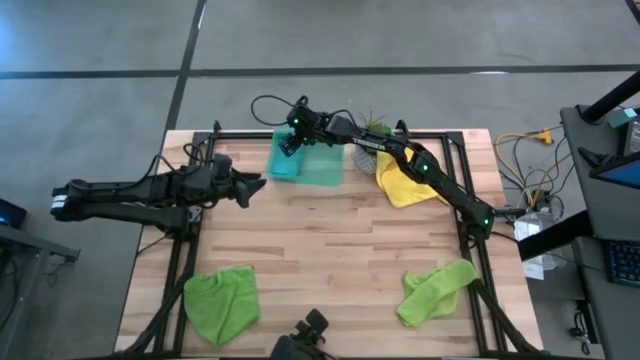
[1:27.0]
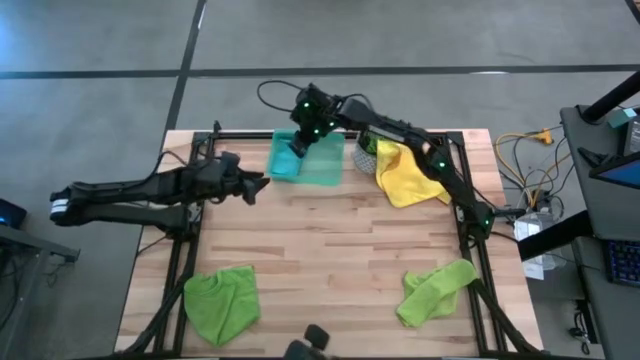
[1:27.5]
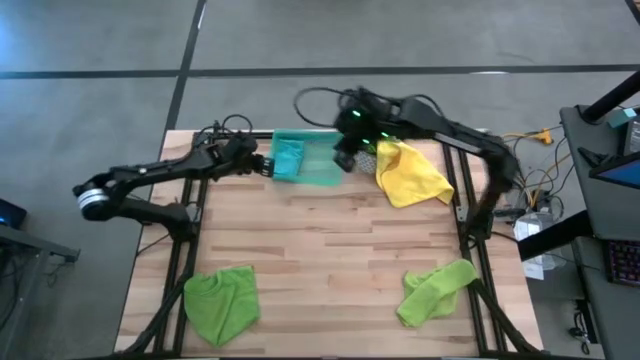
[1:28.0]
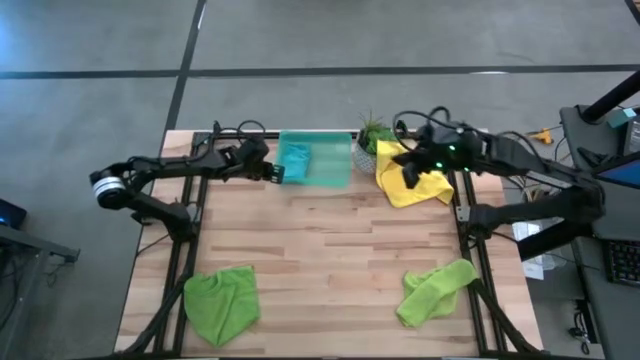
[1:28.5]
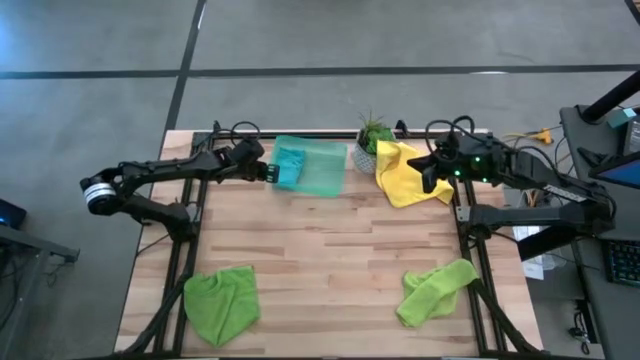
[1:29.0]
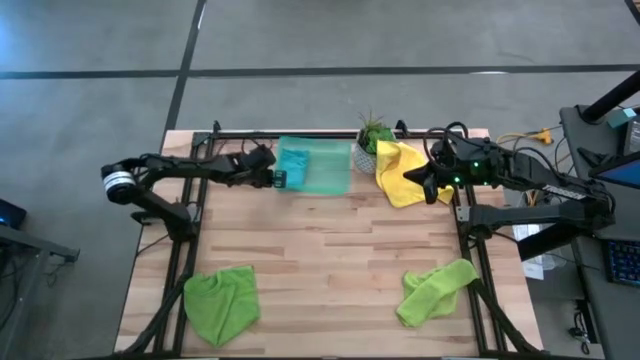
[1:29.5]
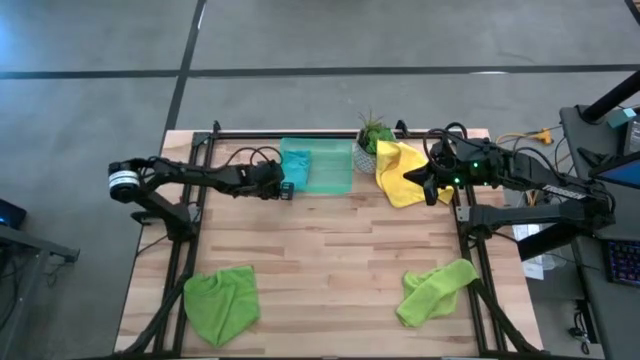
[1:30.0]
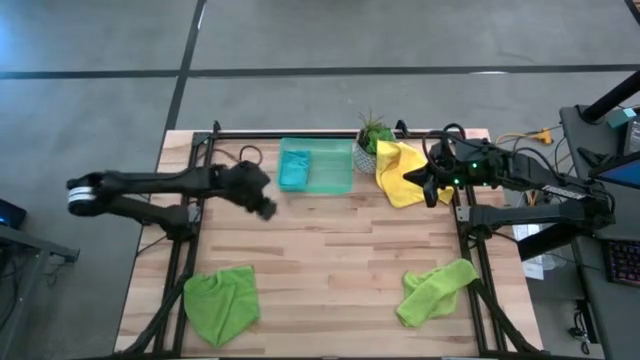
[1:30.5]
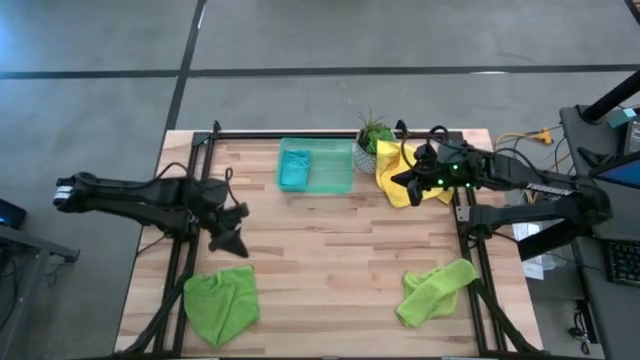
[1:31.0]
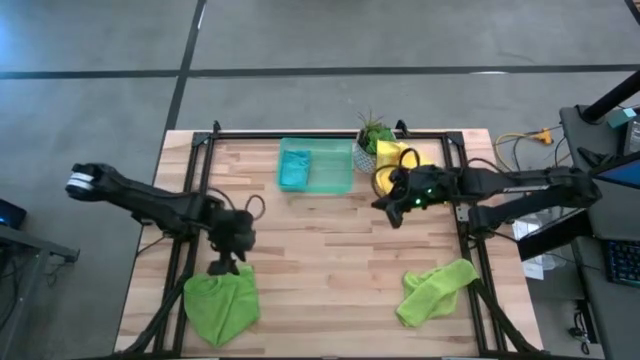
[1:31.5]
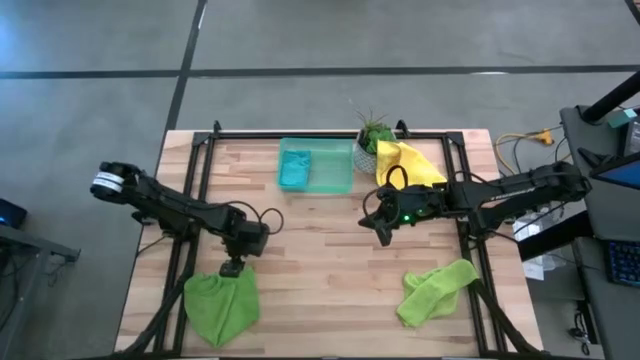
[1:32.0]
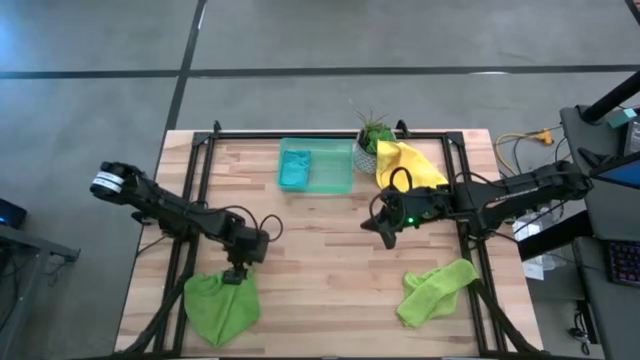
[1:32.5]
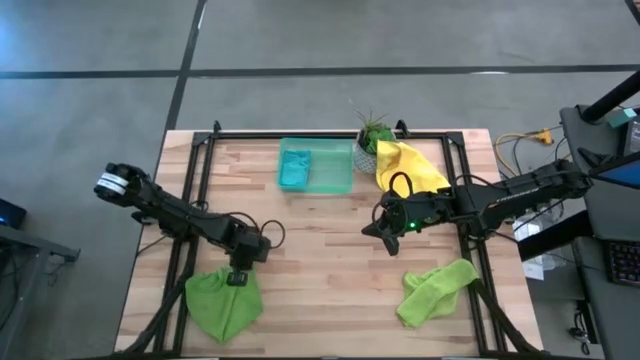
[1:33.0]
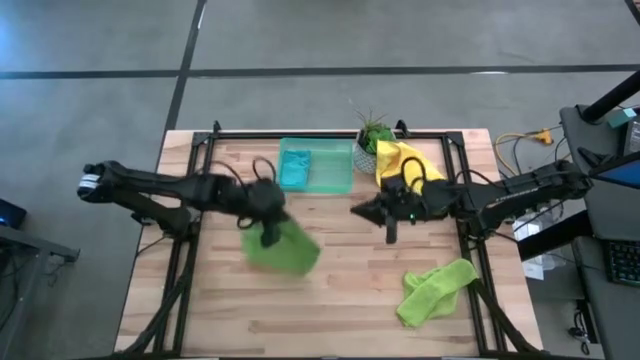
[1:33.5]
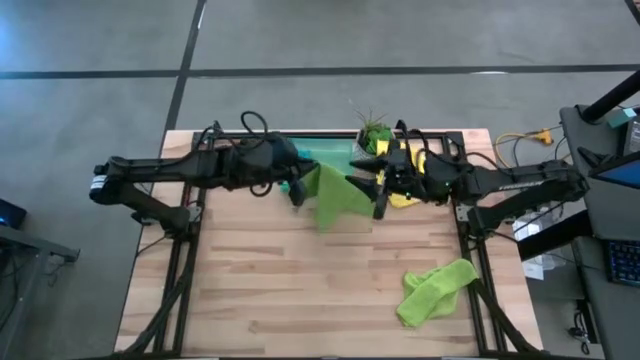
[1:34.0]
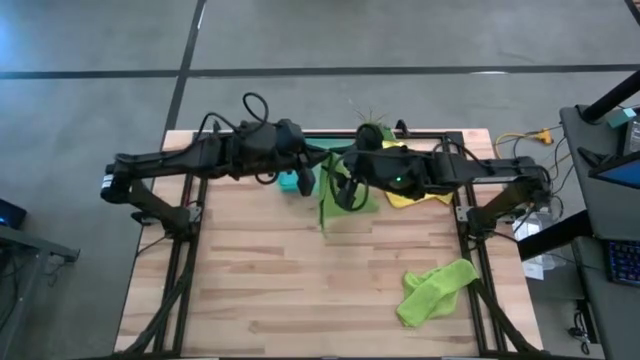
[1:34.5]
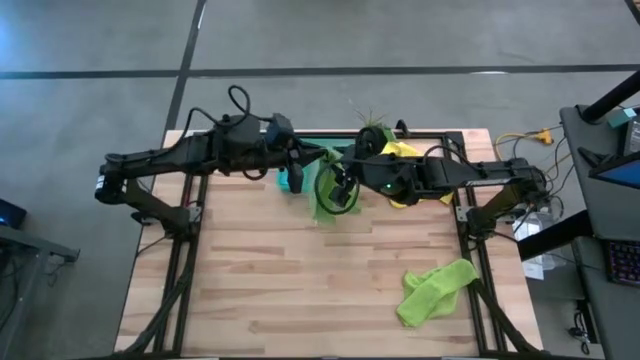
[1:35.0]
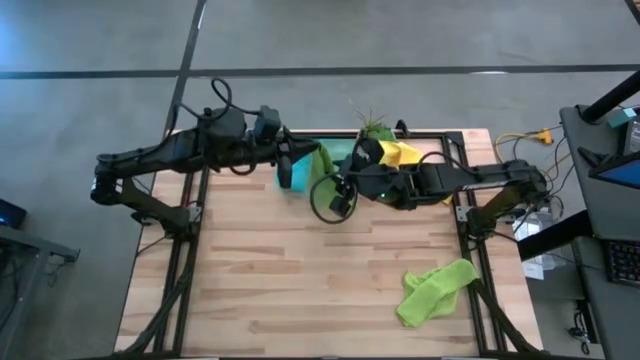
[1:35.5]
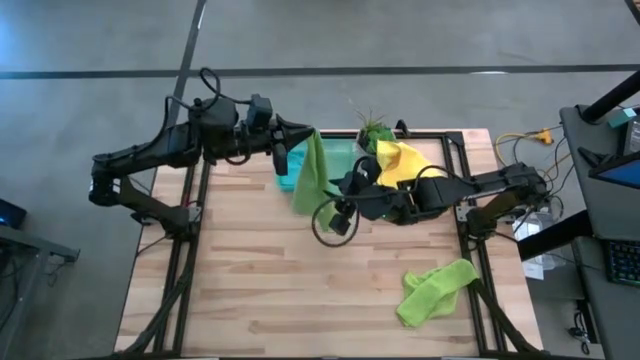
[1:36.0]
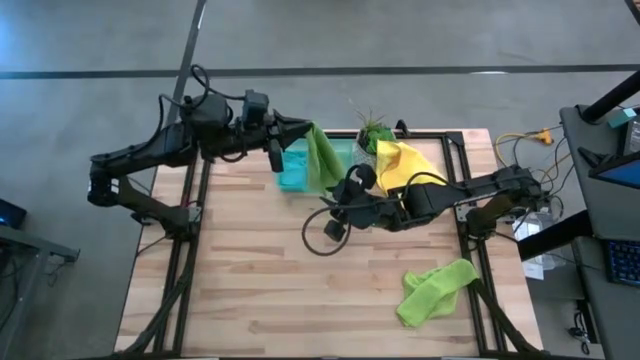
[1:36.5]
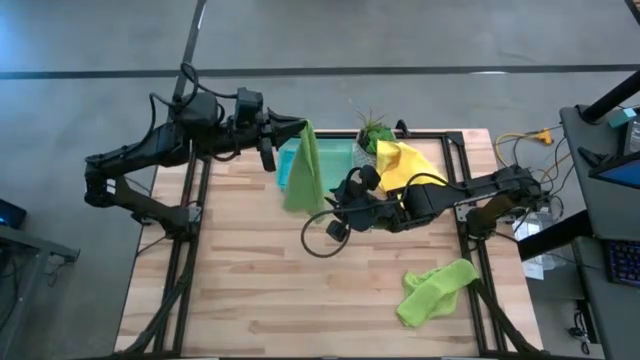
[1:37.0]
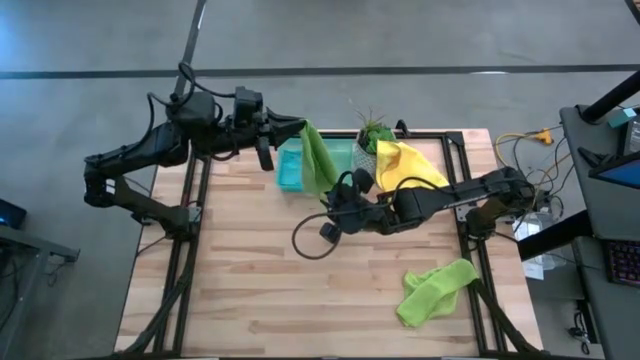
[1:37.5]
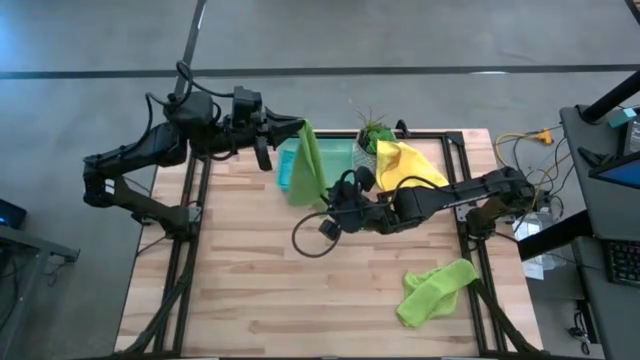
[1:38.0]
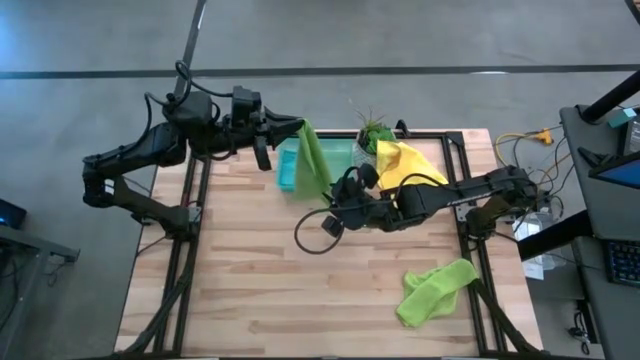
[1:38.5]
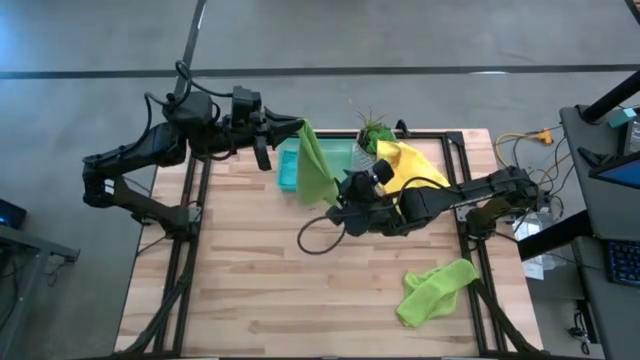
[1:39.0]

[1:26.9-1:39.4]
Task: Fold microfiber towels
Fold the green microfiber towel

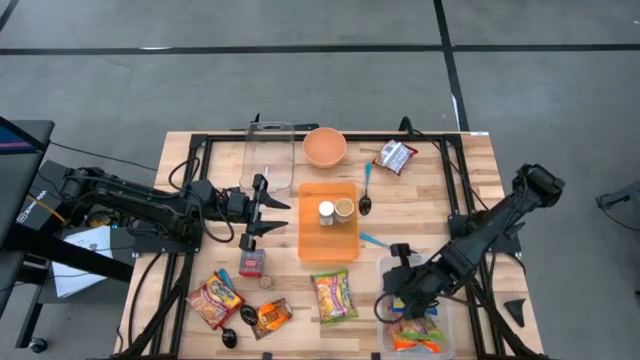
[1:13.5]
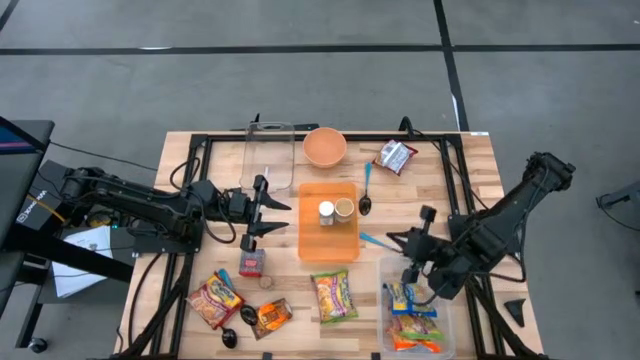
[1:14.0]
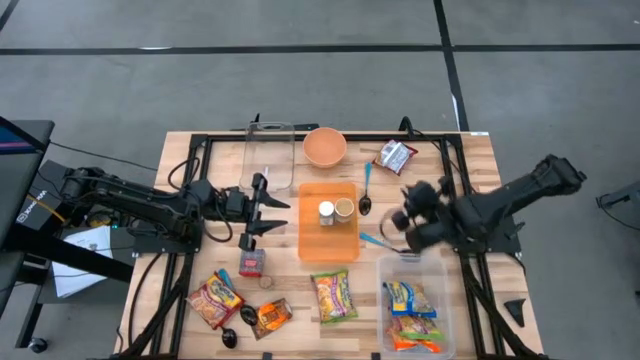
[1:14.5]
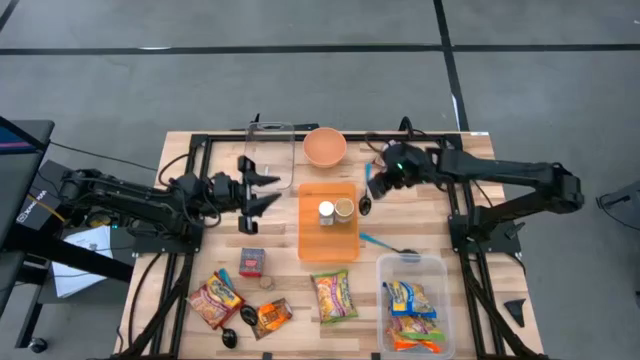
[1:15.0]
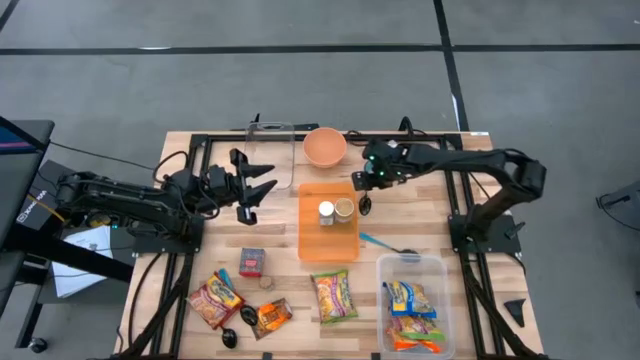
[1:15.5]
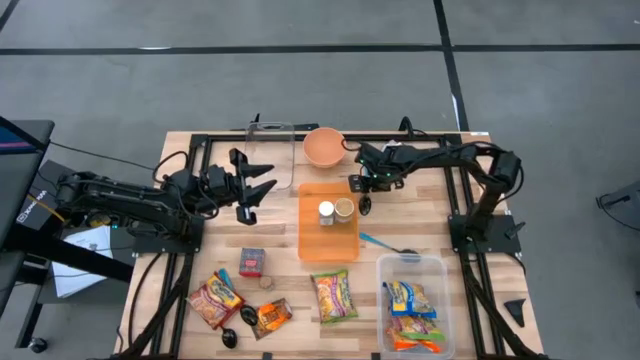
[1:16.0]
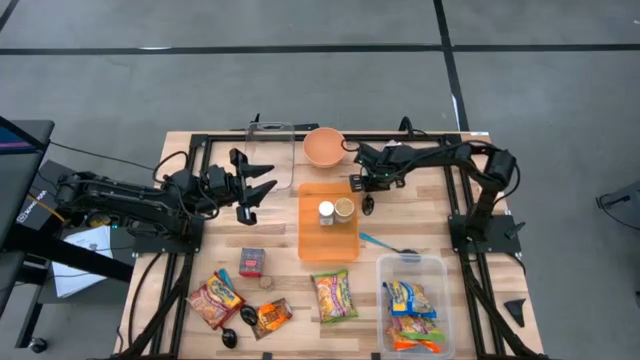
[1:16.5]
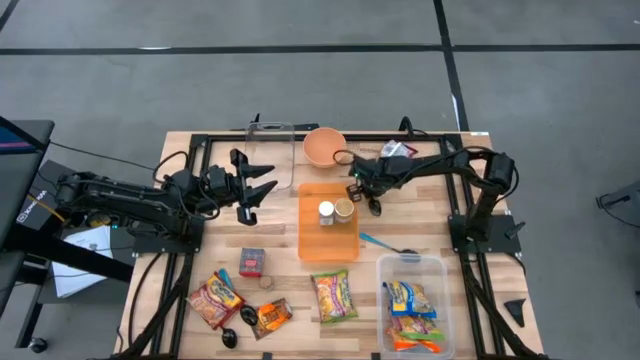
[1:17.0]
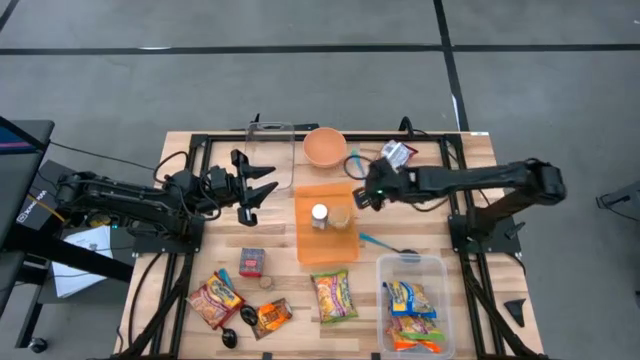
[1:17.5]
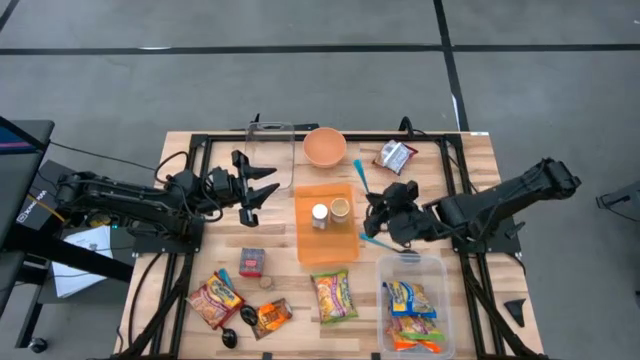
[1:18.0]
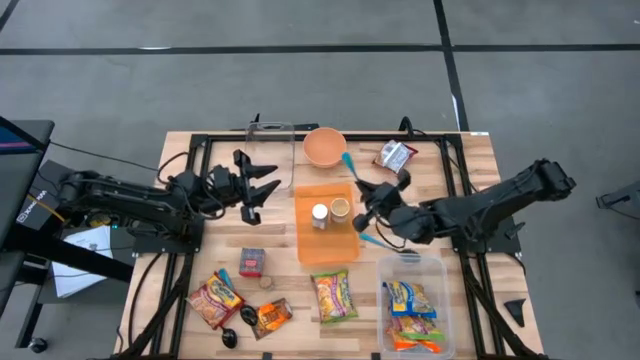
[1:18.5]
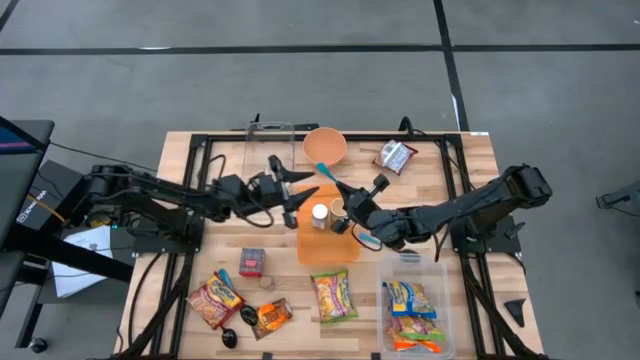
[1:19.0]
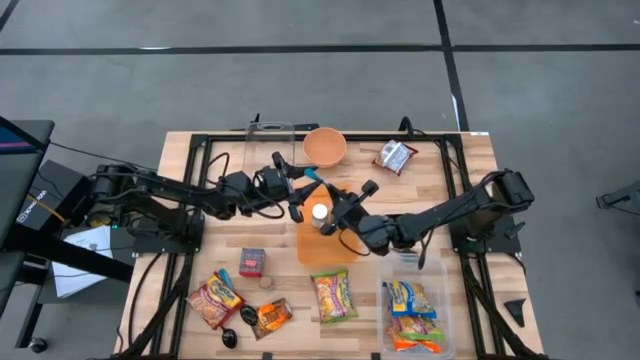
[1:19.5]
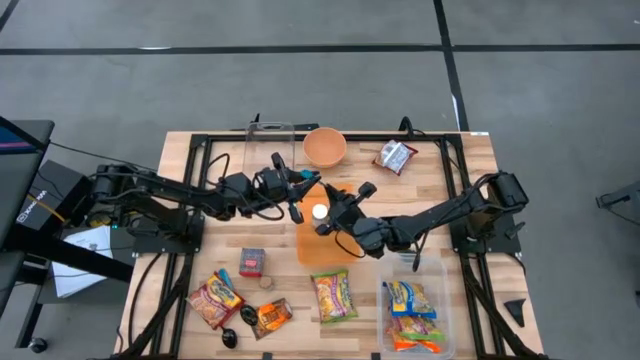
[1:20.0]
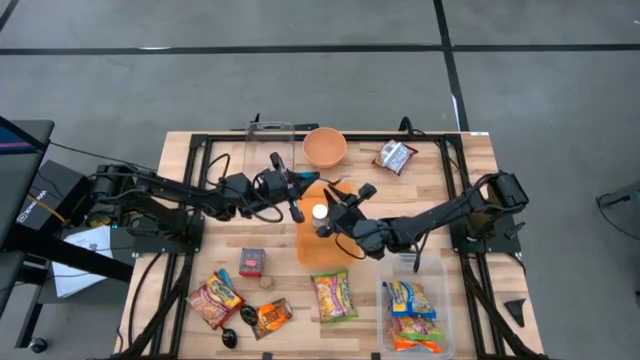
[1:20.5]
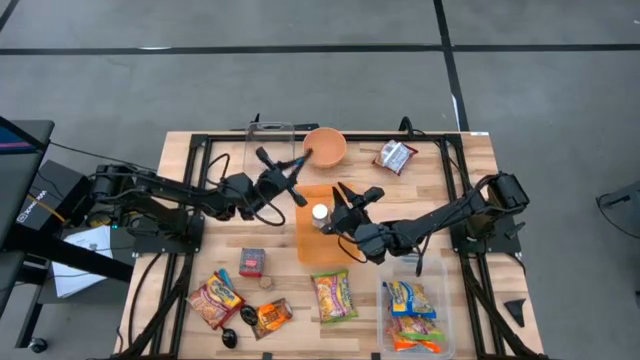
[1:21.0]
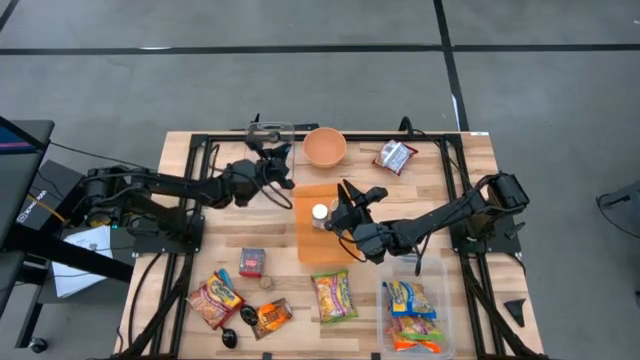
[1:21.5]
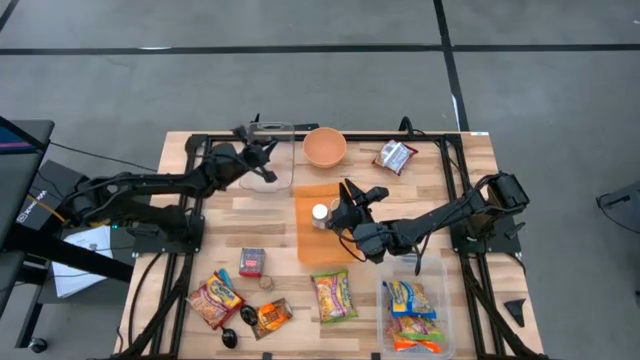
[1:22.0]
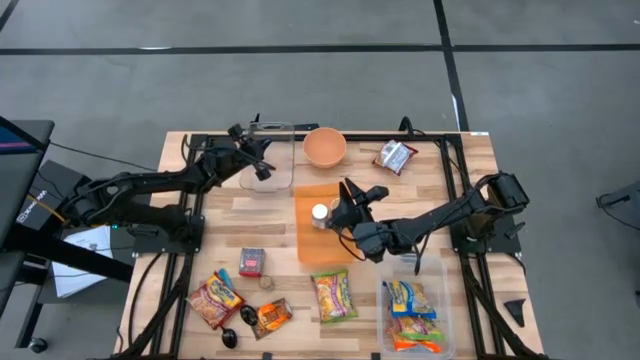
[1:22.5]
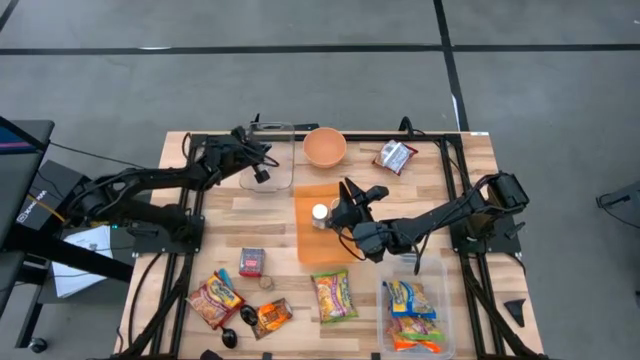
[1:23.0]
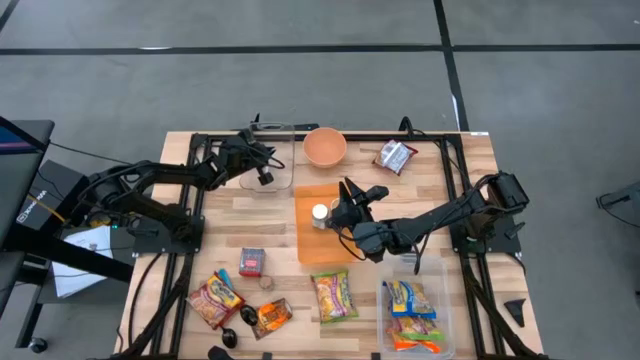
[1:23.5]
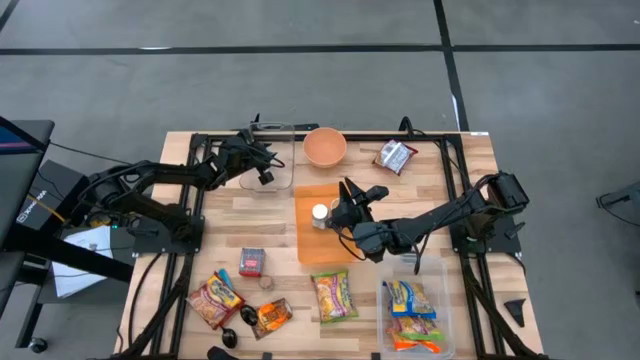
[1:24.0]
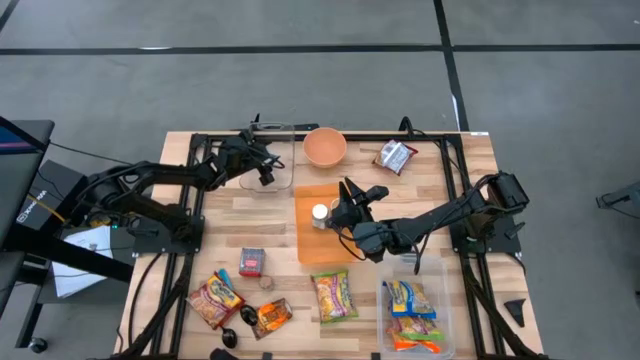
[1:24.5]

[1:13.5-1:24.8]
Task: Pick & Place Food Item
Put the blue spoon into the transparent bin
